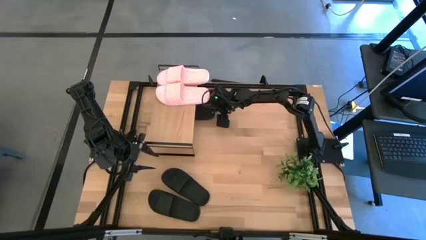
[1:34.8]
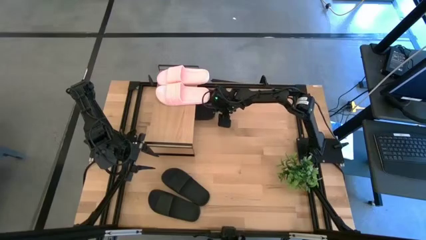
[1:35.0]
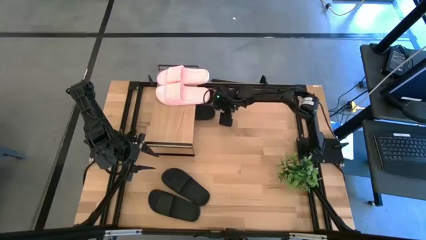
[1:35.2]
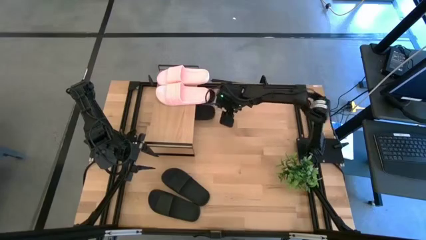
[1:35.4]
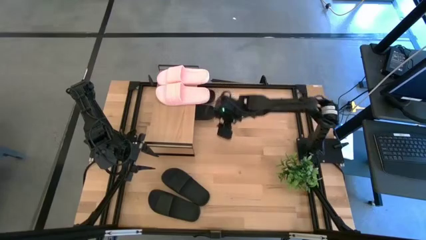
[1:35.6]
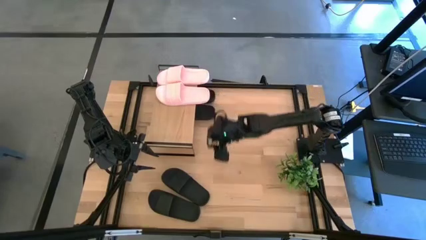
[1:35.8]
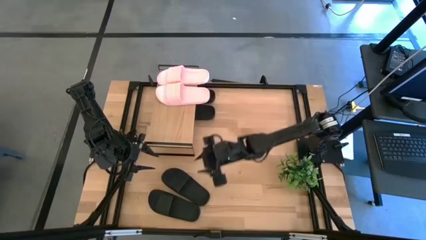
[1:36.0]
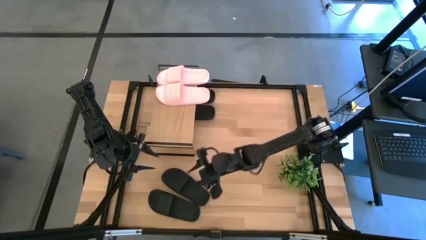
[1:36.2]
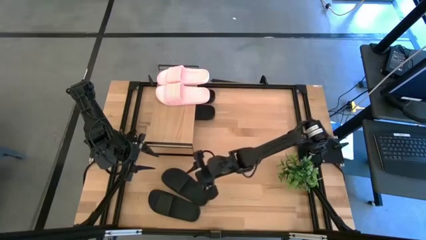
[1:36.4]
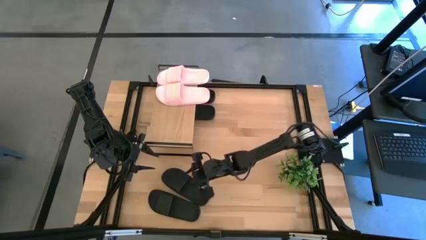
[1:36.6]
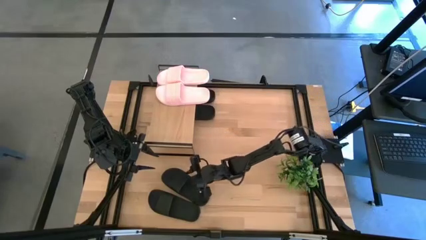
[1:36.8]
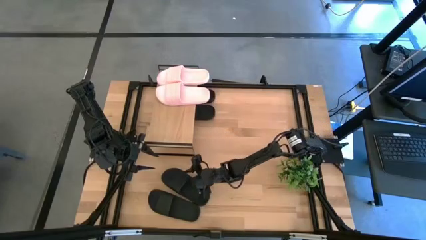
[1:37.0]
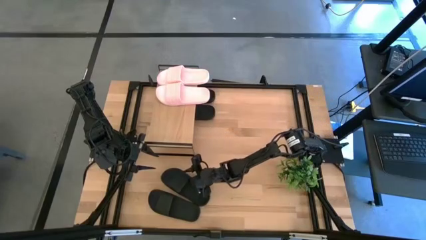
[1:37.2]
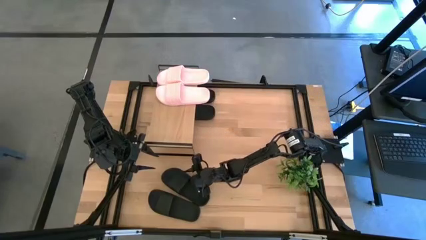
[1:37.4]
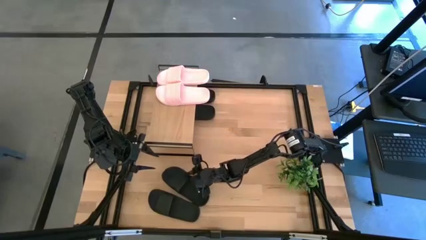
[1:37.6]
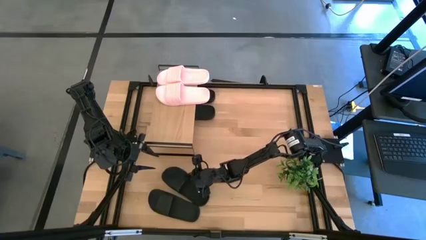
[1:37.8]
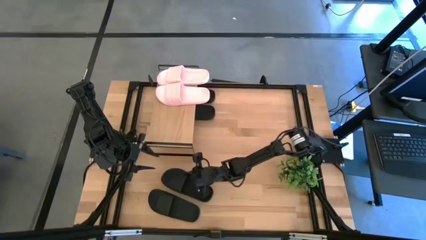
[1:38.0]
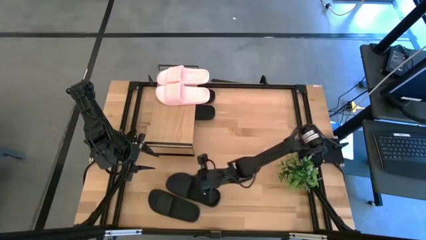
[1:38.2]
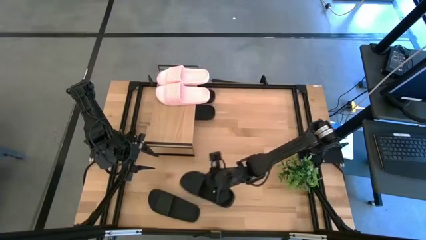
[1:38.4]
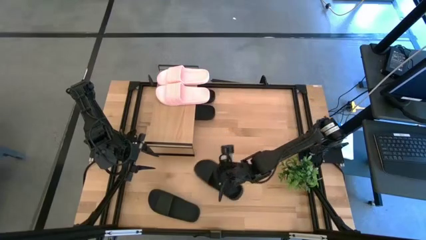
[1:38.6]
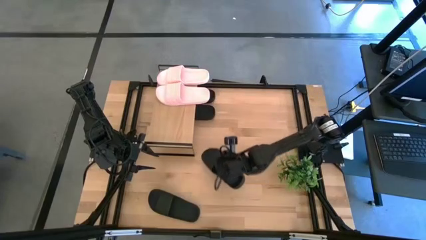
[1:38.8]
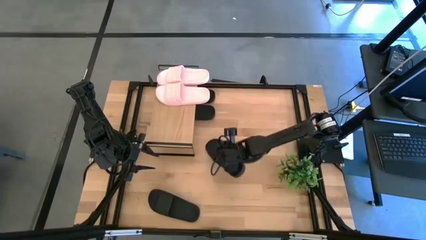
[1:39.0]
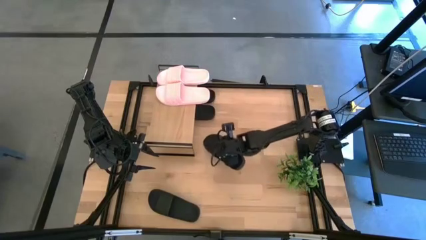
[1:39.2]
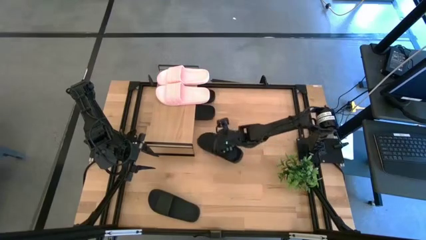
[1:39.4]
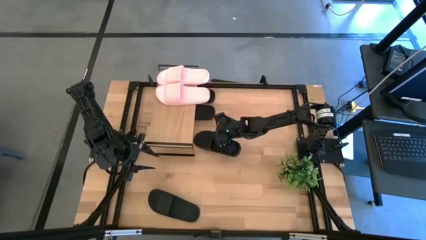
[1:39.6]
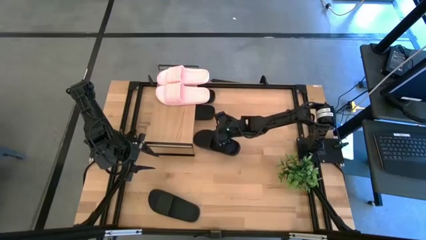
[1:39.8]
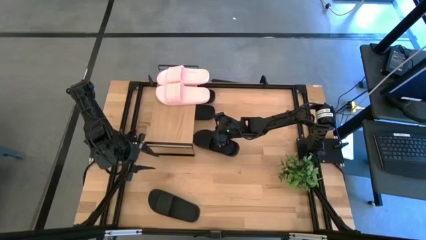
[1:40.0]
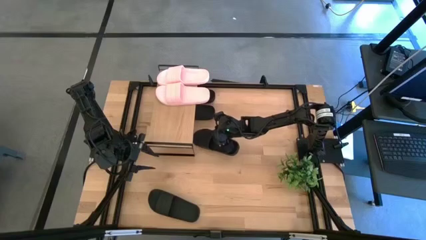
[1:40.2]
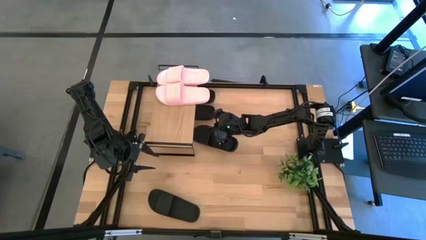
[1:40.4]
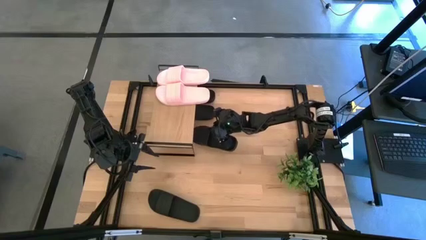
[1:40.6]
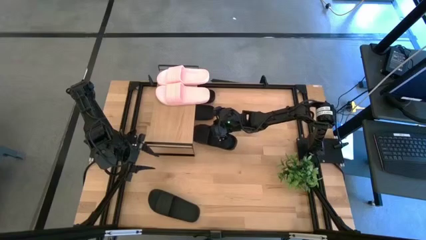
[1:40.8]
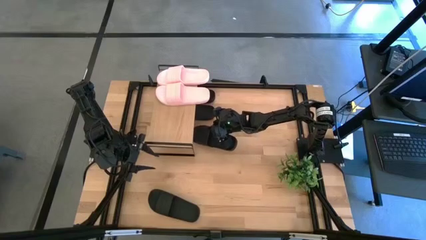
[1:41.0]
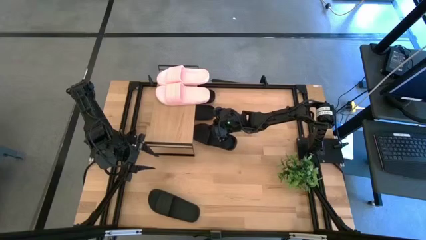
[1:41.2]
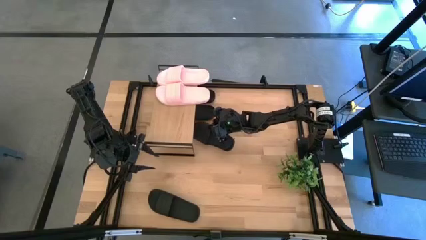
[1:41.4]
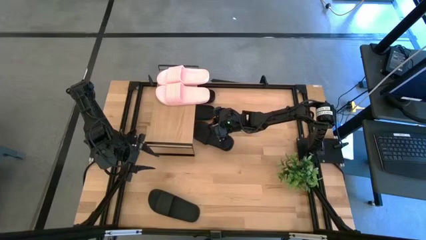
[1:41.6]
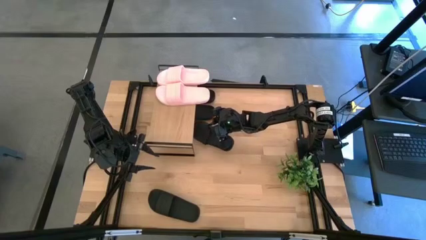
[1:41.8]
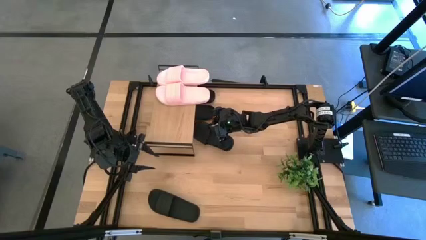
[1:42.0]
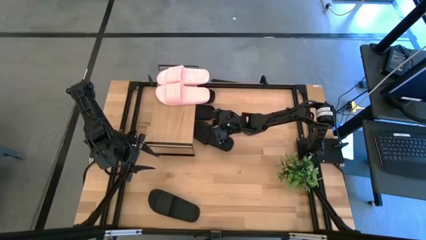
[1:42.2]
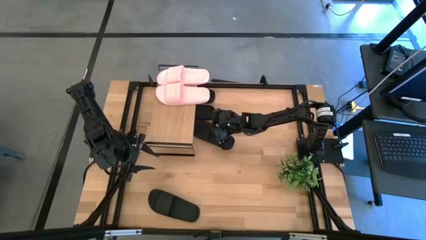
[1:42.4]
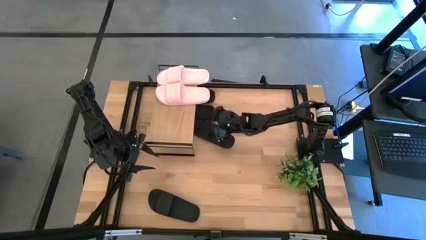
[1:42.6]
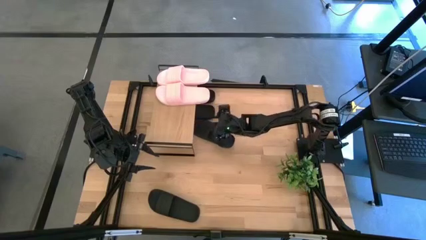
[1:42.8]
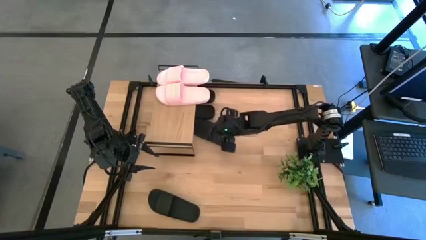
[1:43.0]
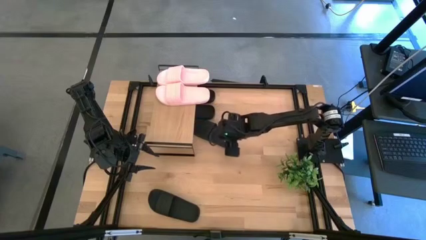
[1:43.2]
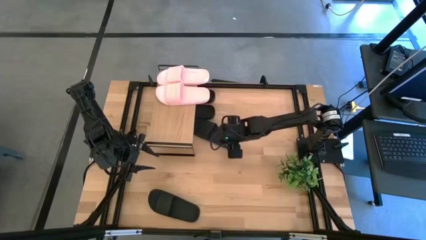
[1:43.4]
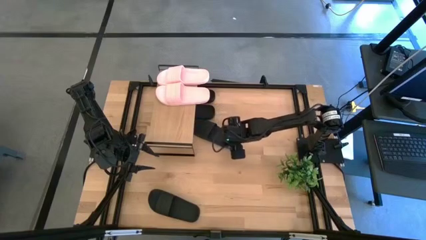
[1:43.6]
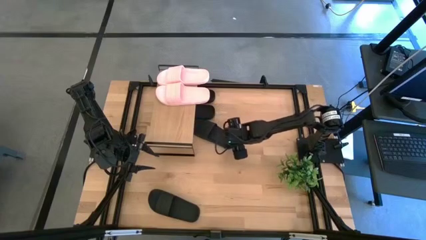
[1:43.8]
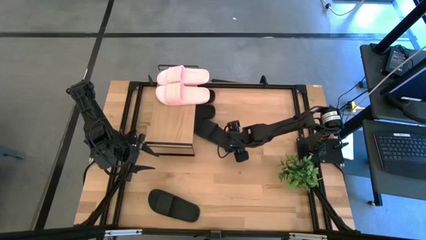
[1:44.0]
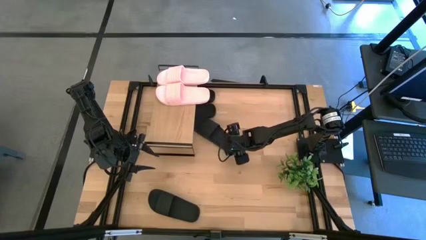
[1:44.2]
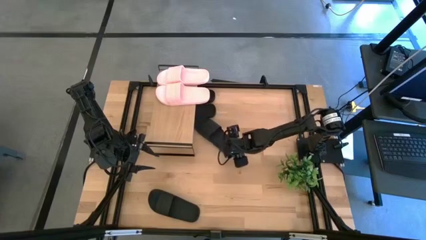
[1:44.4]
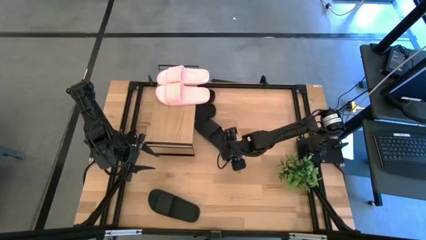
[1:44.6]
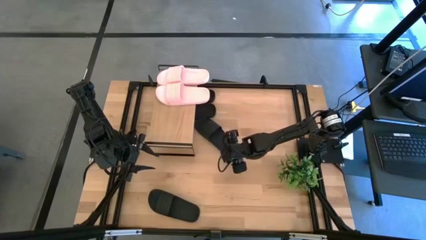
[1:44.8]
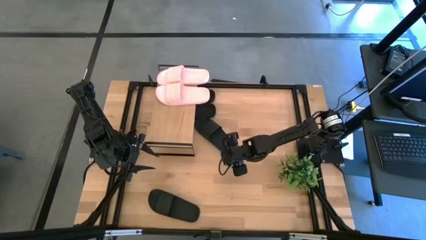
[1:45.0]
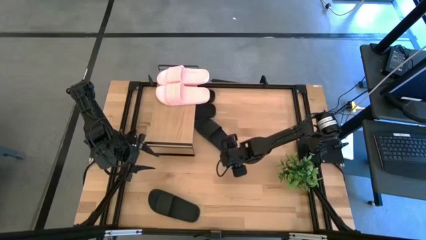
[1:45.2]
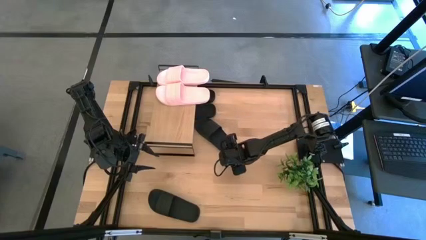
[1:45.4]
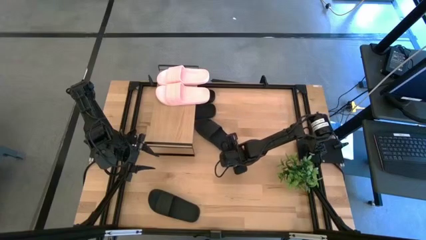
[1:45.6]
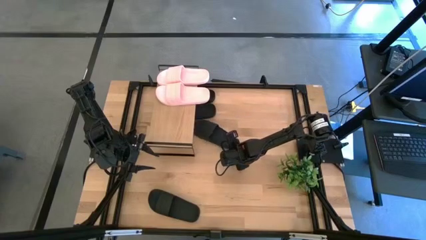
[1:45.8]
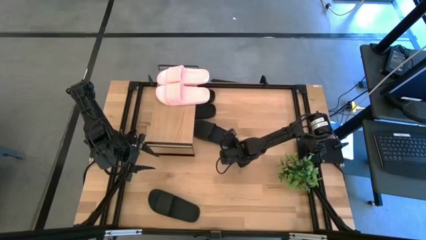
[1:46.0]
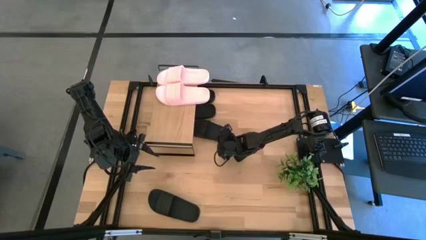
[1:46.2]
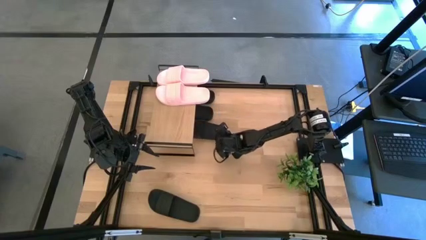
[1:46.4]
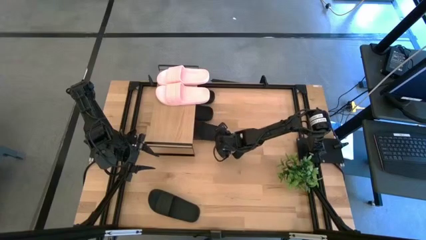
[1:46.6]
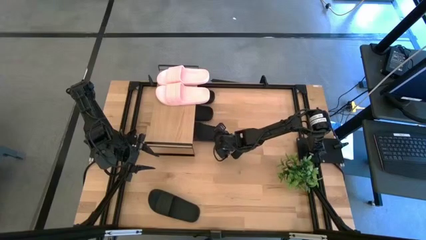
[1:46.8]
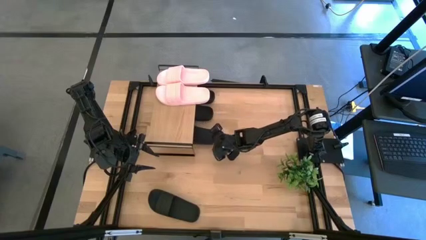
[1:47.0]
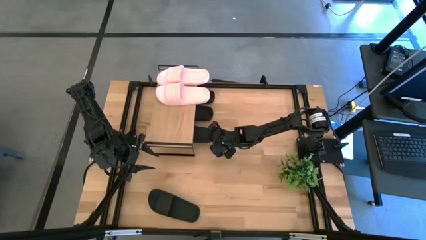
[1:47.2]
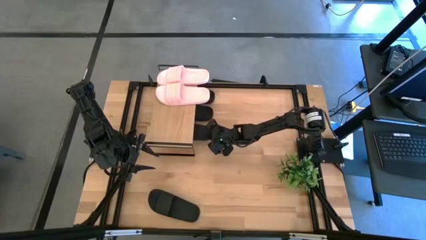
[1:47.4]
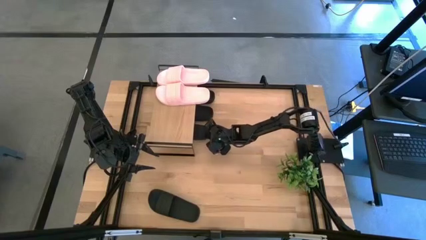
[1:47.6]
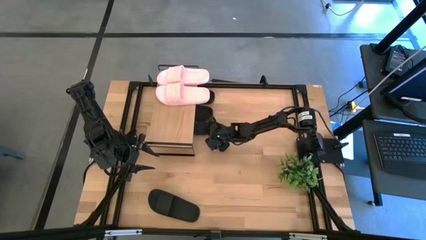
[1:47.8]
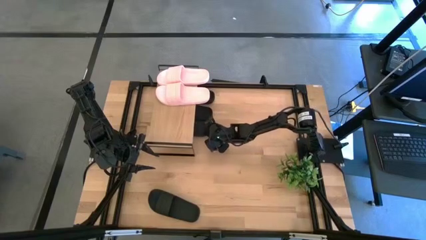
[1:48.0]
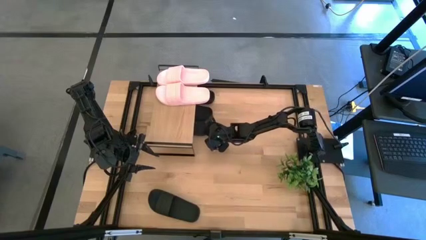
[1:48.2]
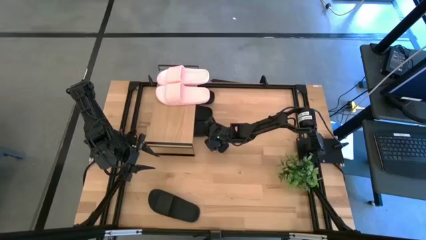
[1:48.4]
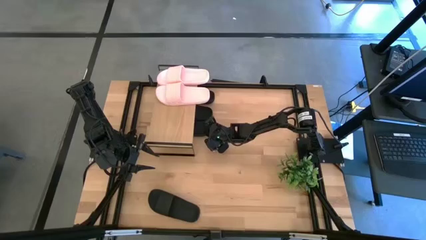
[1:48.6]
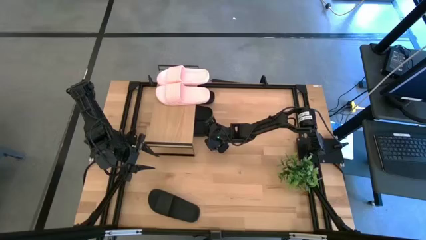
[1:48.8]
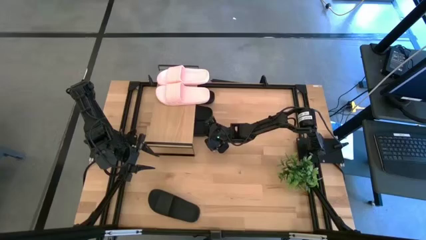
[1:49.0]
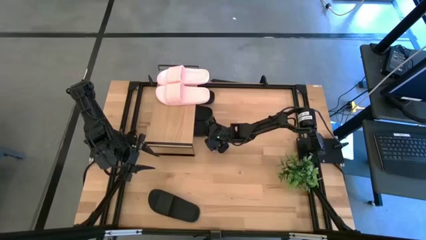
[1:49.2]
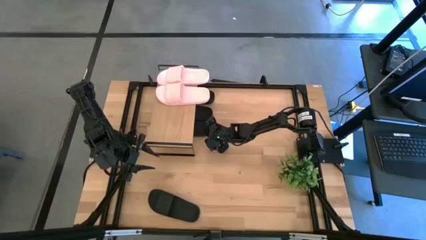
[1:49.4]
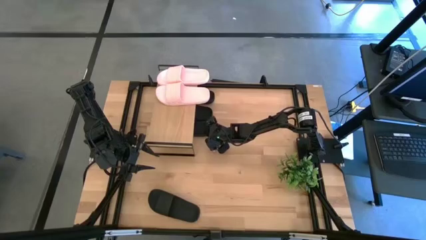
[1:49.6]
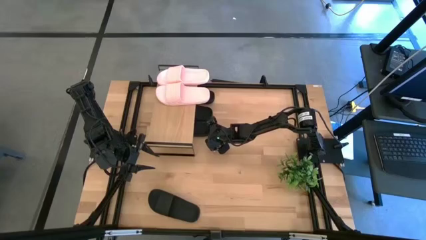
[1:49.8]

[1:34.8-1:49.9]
Task: Pick and place slides into the shelf
Put the top black slide under the shelf
